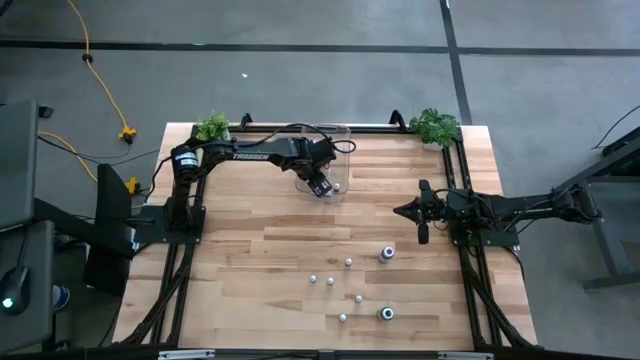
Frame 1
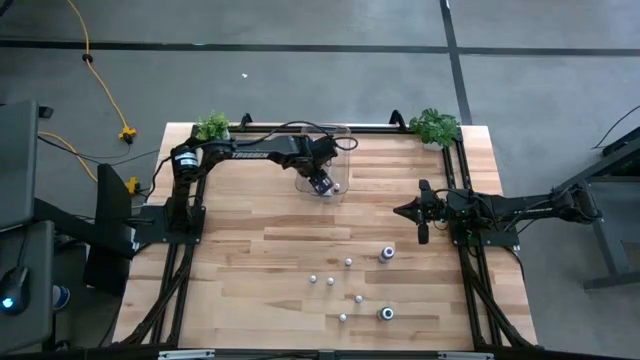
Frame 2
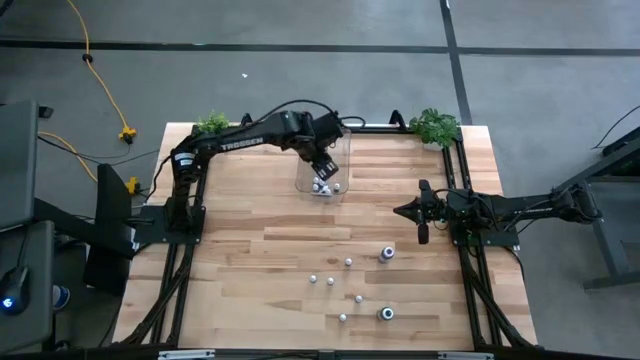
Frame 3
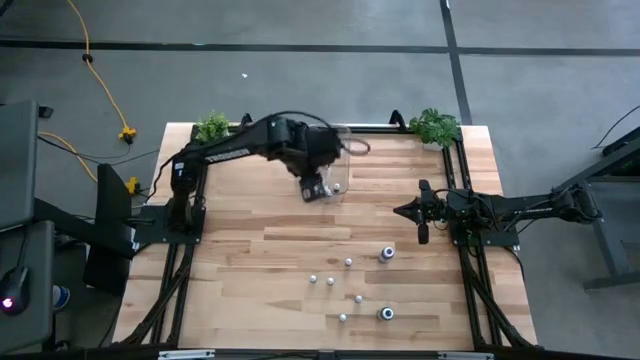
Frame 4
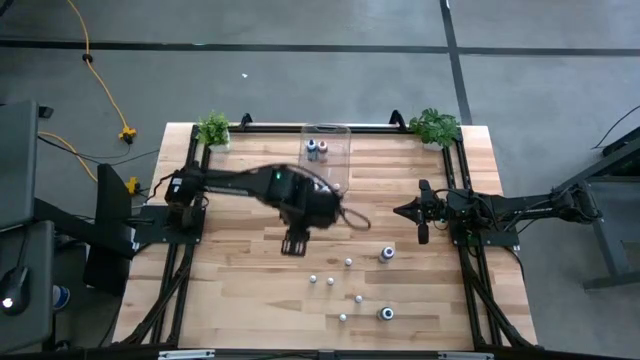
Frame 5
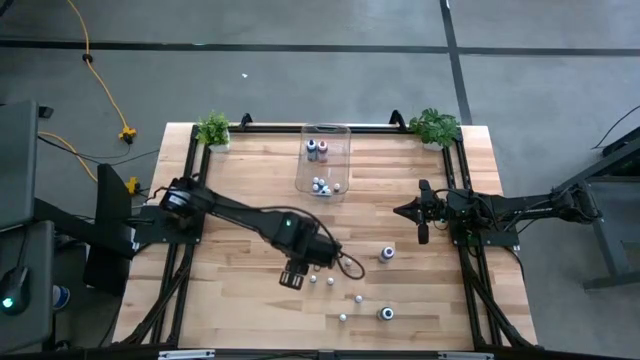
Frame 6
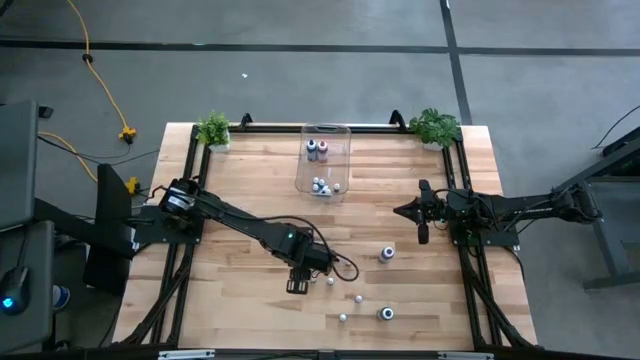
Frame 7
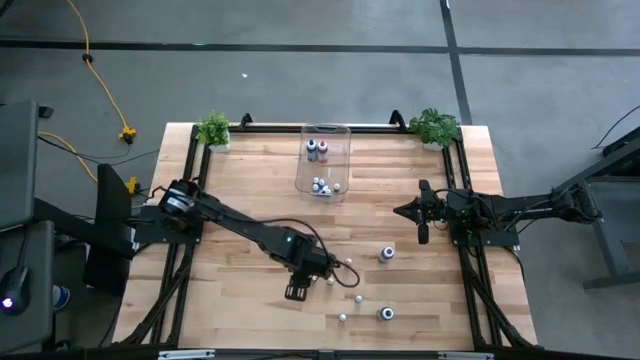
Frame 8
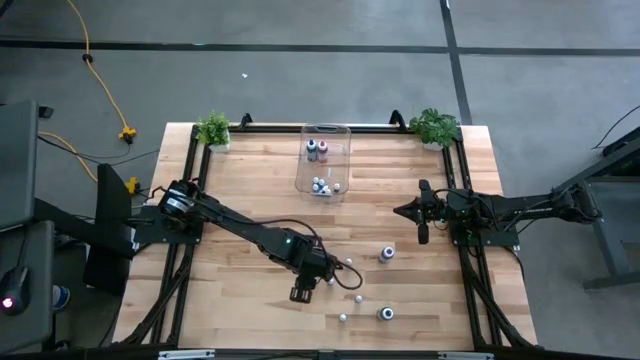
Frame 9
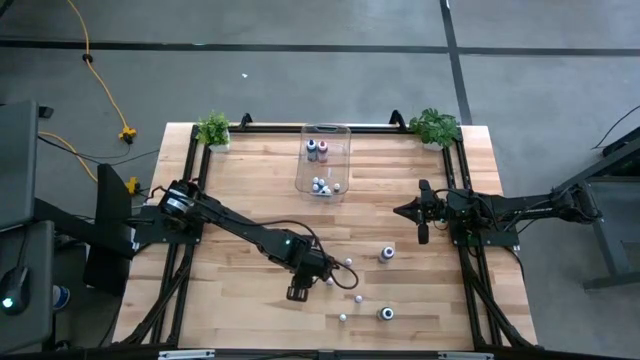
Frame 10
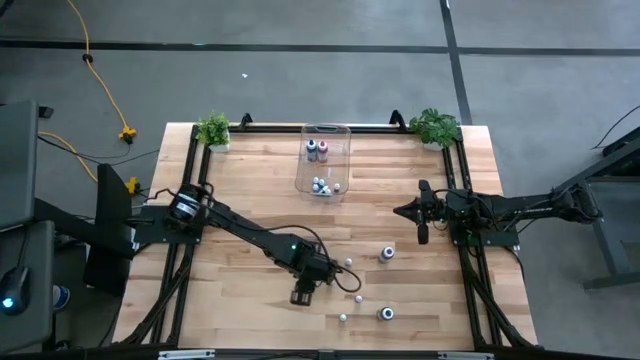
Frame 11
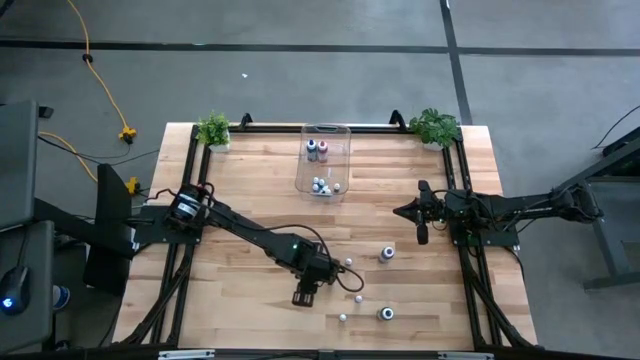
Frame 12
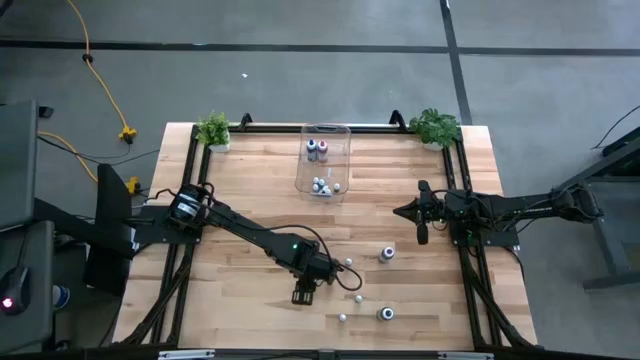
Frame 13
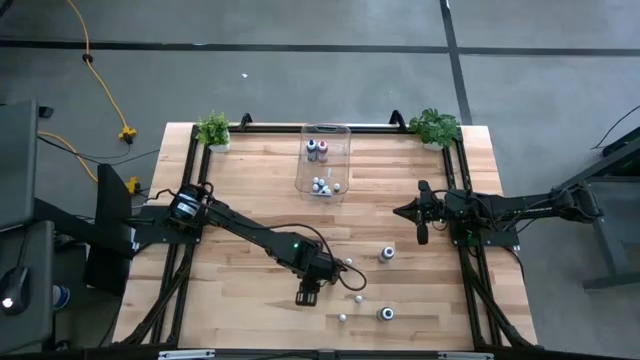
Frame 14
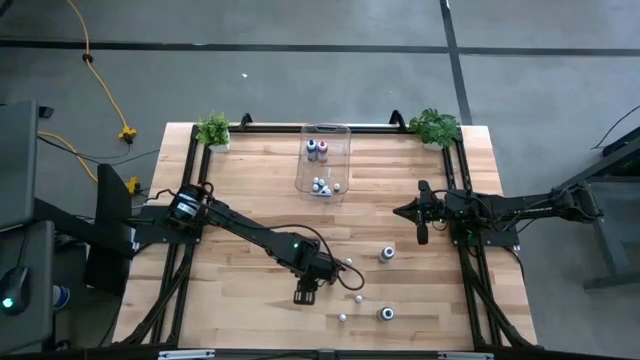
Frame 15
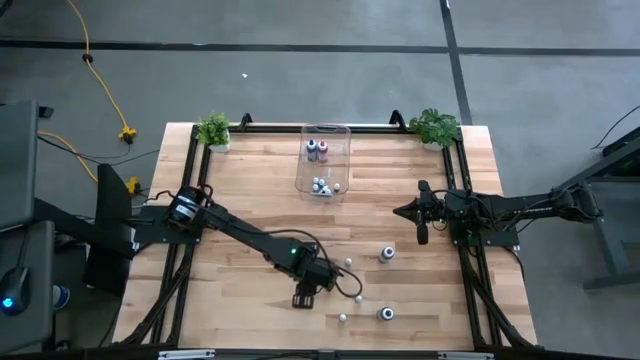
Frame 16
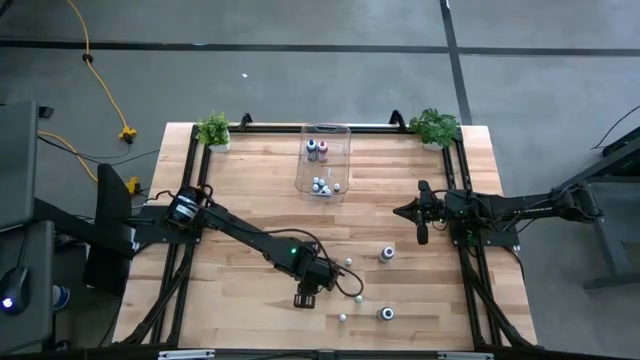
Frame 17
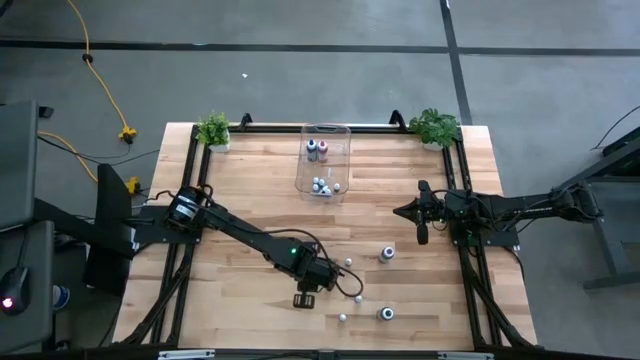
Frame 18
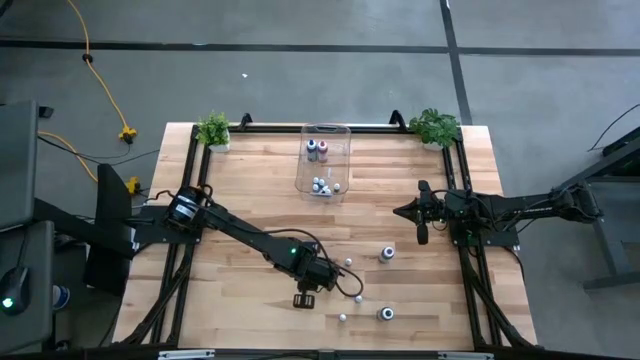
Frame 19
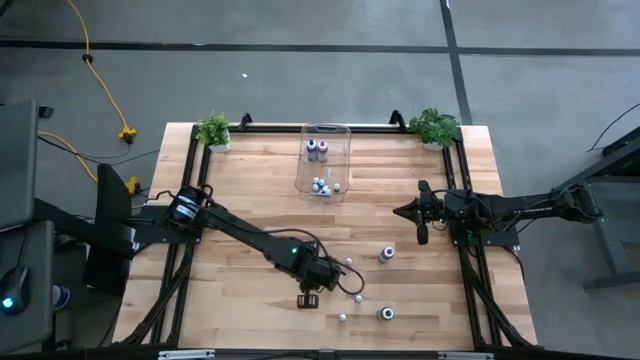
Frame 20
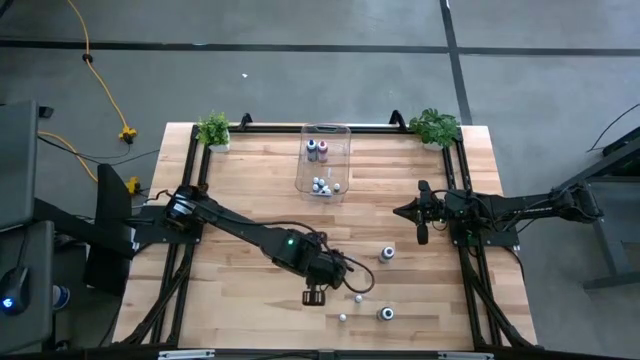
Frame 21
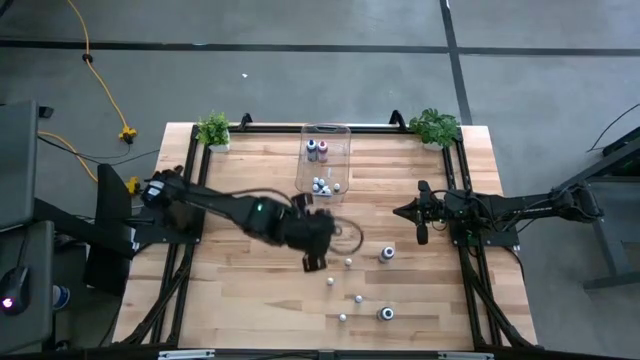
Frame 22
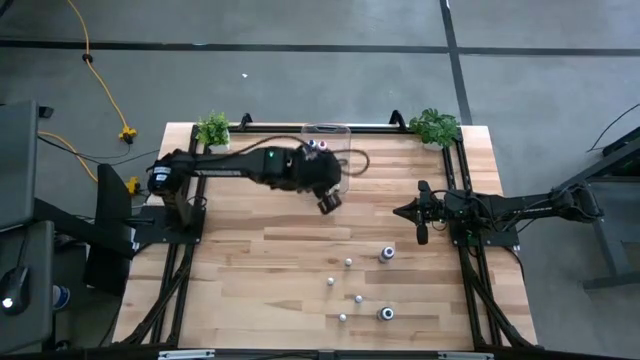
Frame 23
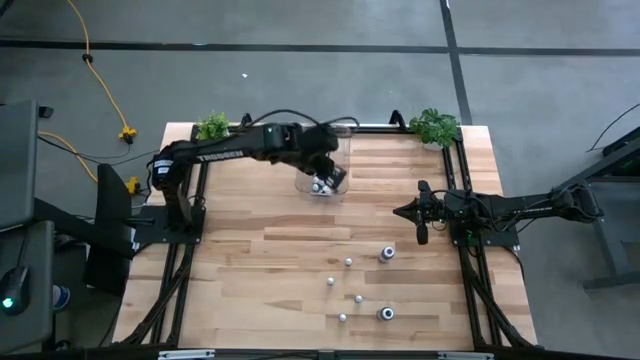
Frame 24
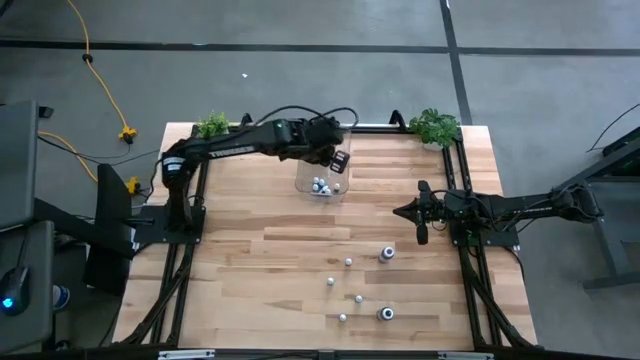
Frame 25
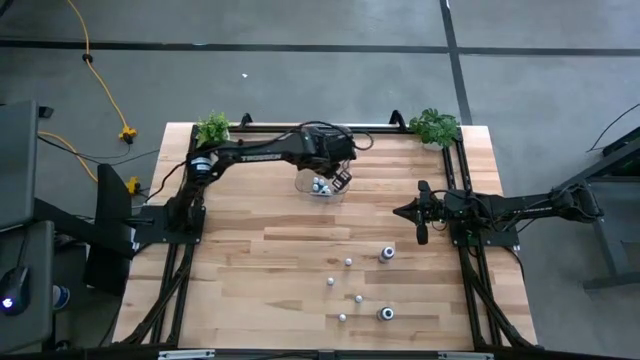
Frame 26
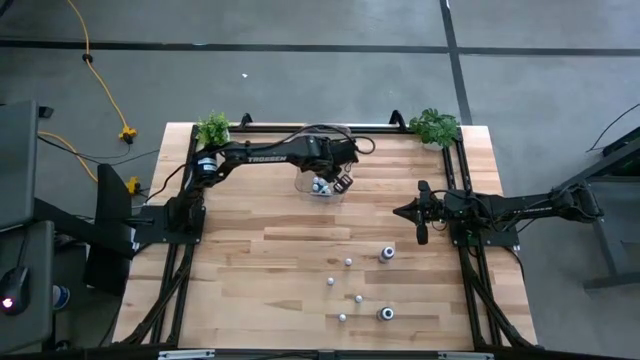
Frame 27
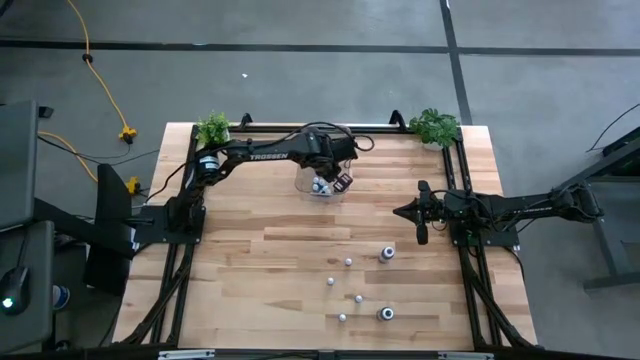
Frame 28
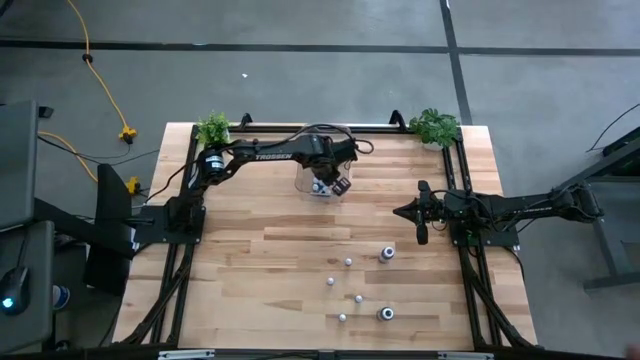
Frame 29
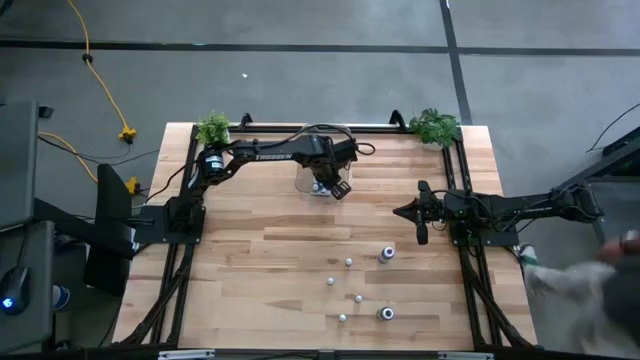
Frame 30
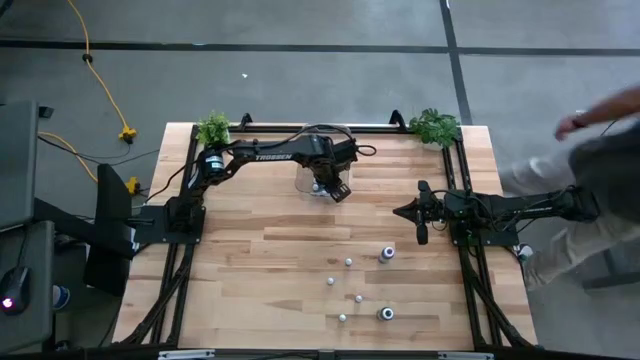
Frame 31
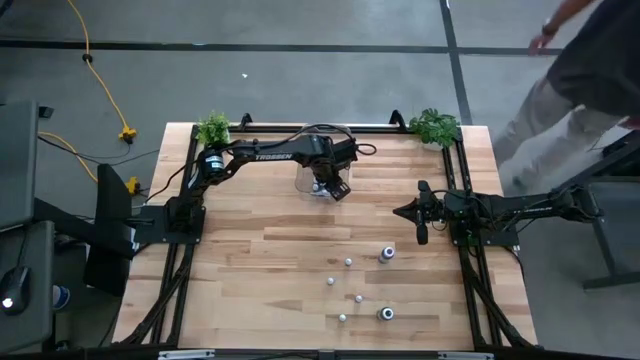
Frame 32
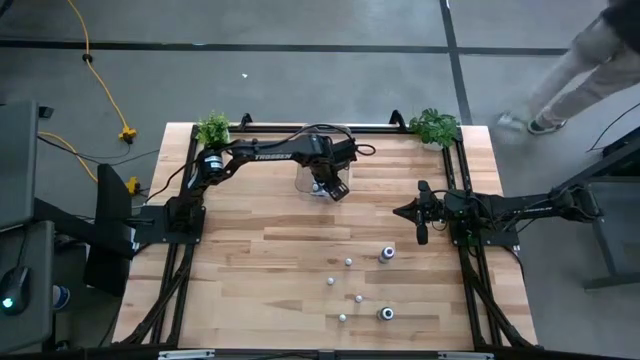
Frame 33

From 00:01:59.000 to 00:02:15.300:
Task: Pick & Place food coloring
Put the small purple food coloring into the transparent bin

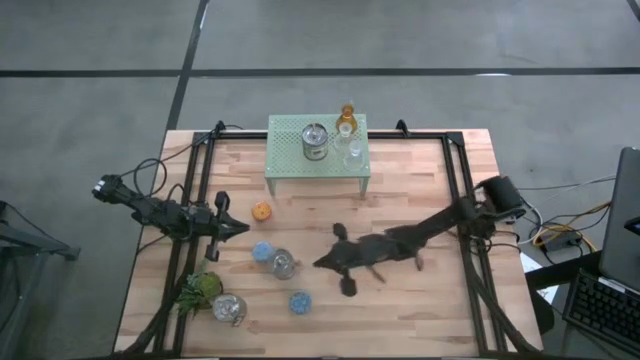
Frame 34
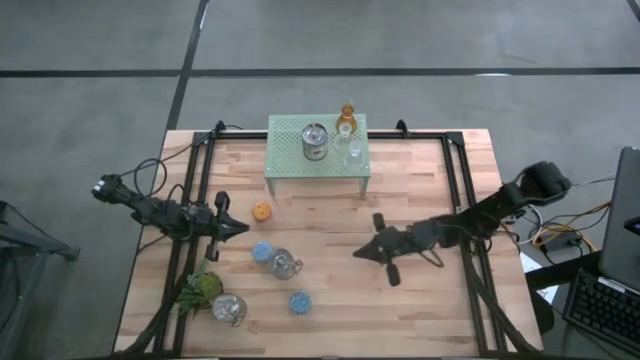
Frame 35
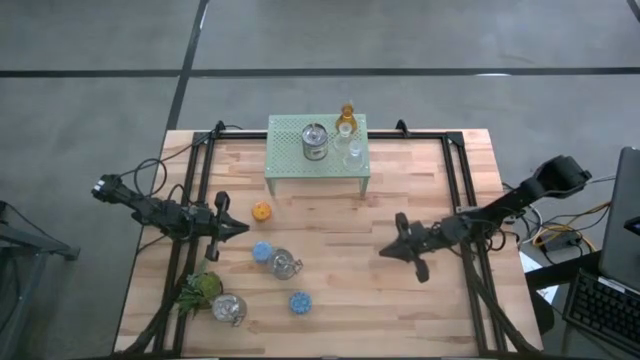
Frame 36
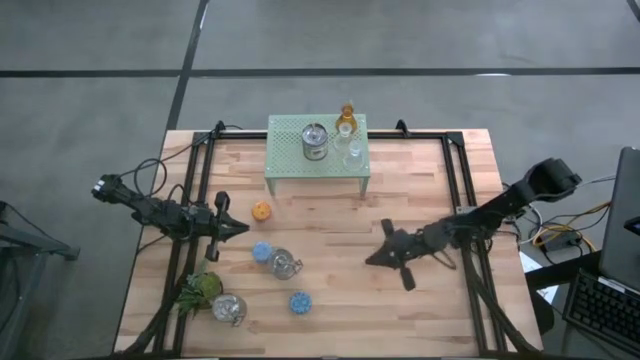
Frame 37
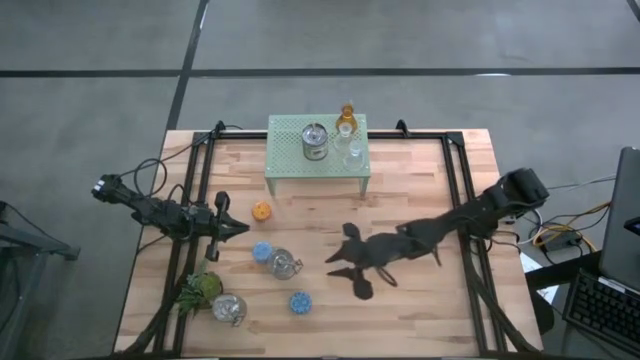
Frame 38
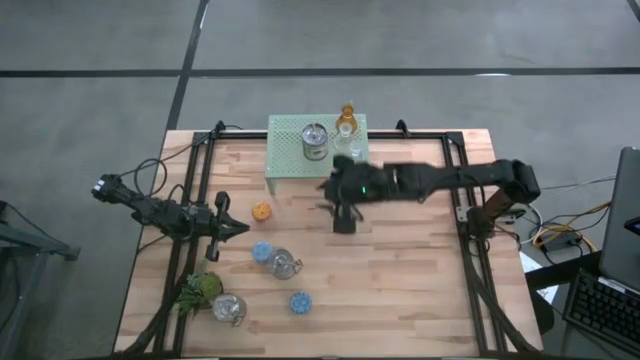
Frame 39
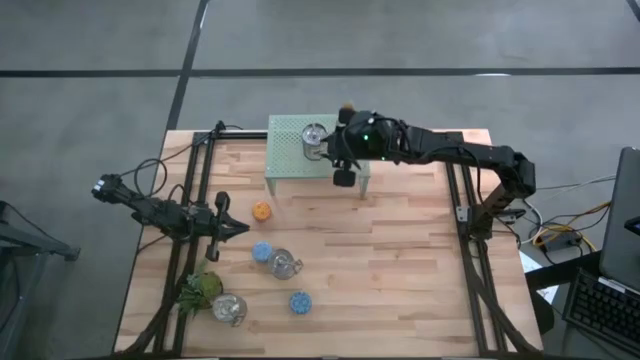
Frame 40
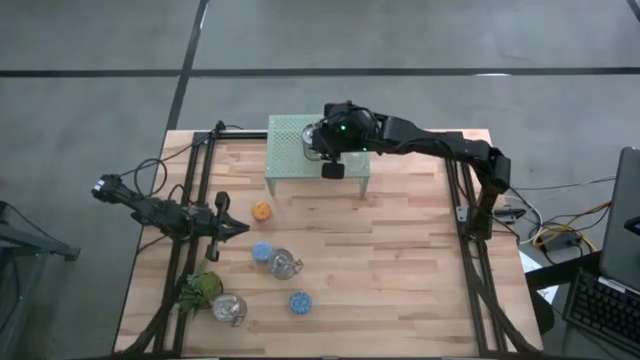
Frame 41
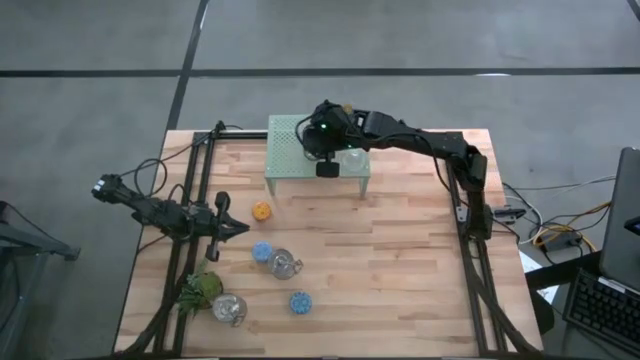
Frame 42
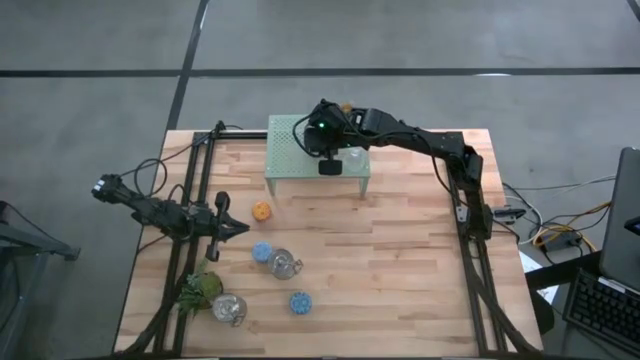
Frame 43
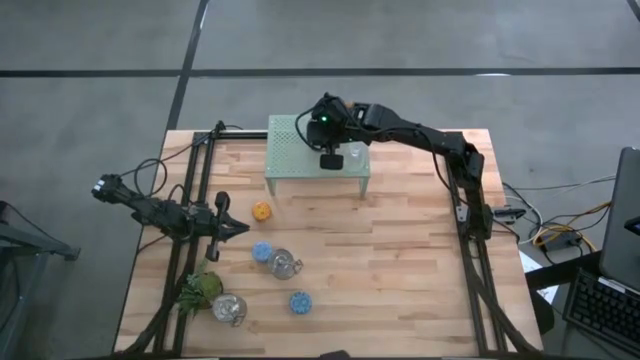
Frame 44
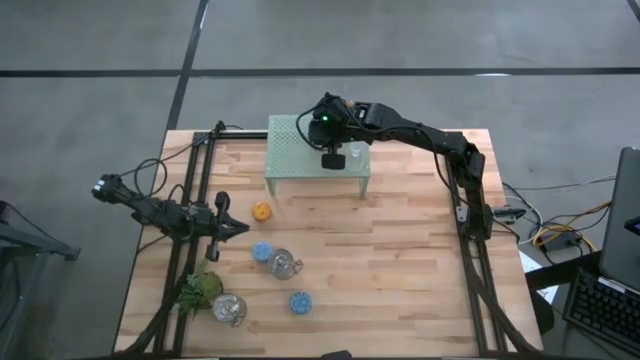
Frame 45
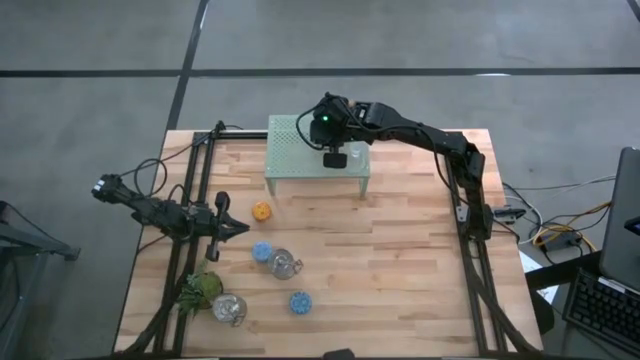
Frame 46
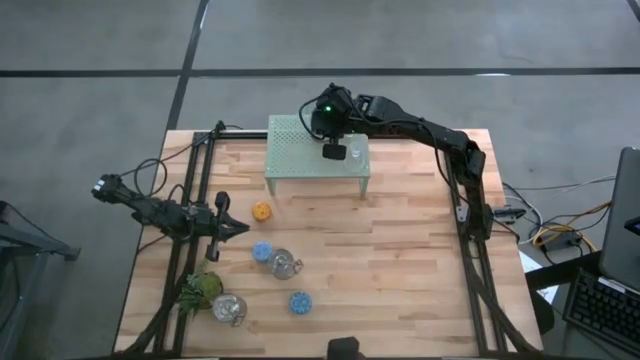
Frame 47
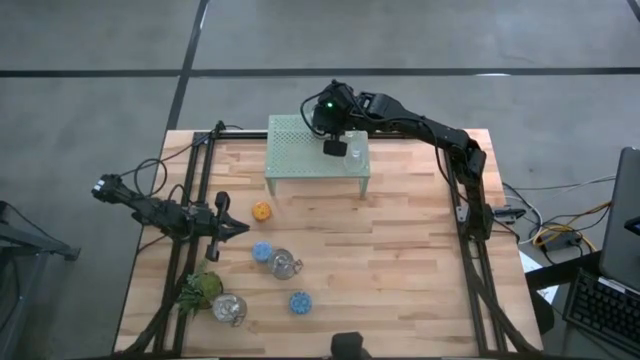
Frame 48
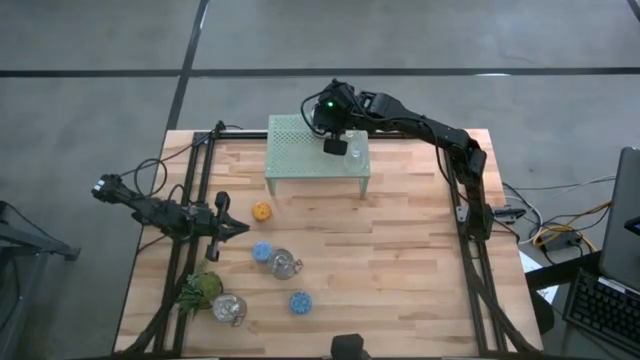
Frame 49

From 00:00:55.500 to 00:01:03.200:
Task: Pick & Place candle stick holders
Adjust the green scented candle on the shelf
